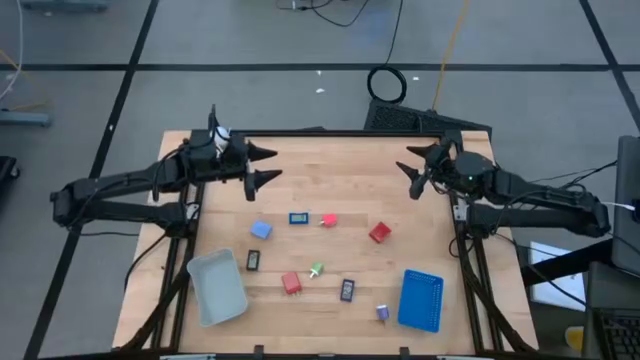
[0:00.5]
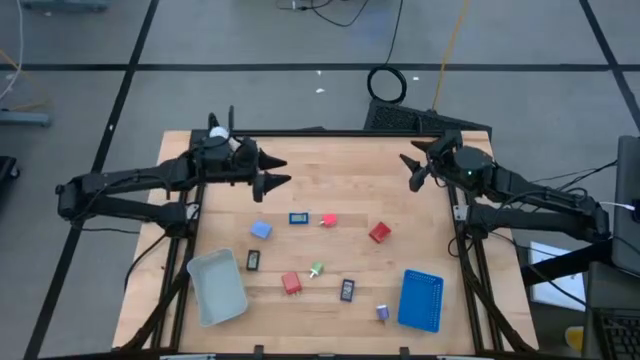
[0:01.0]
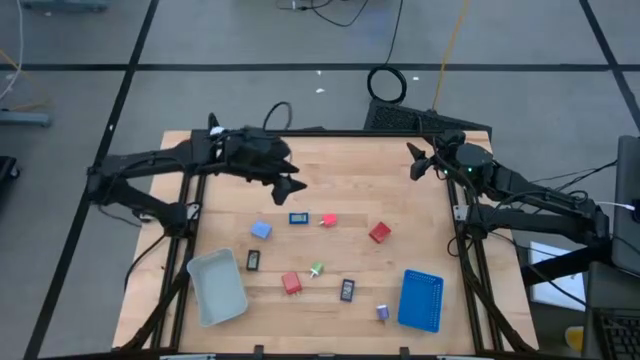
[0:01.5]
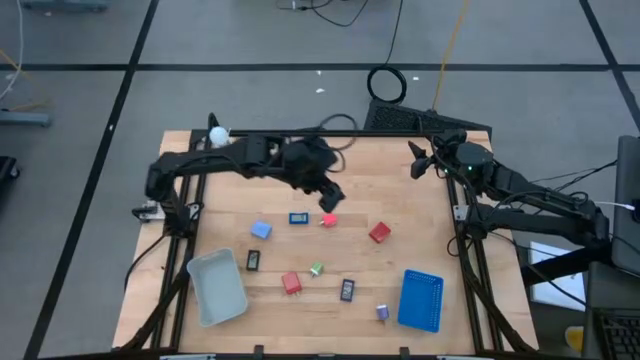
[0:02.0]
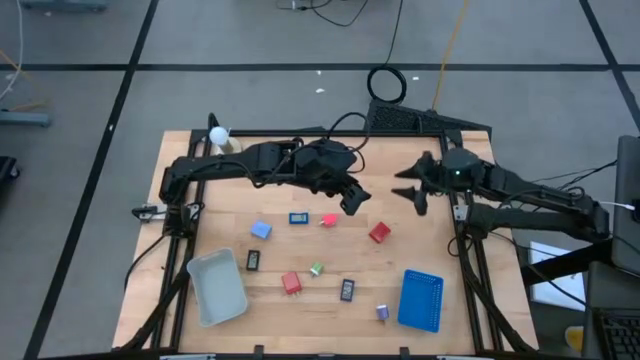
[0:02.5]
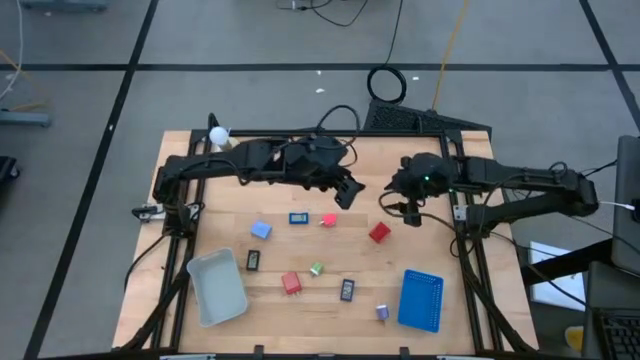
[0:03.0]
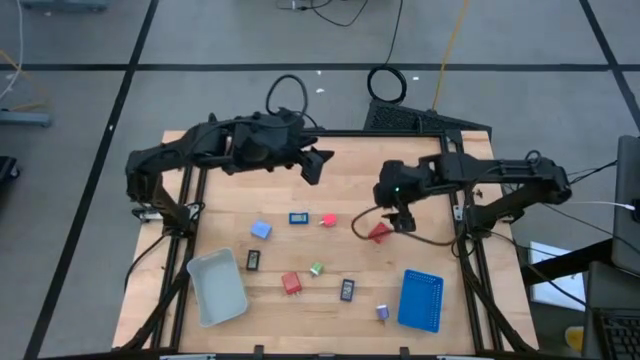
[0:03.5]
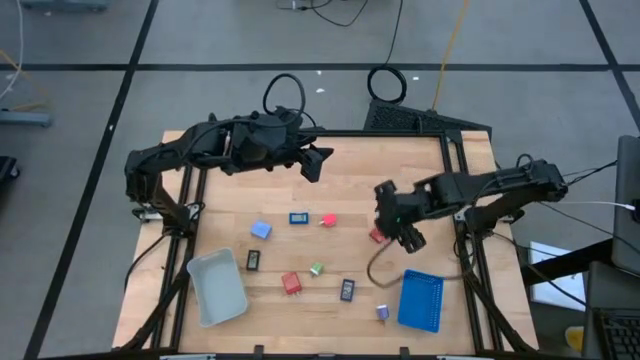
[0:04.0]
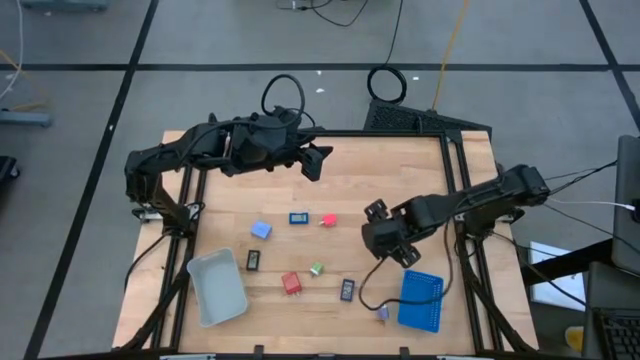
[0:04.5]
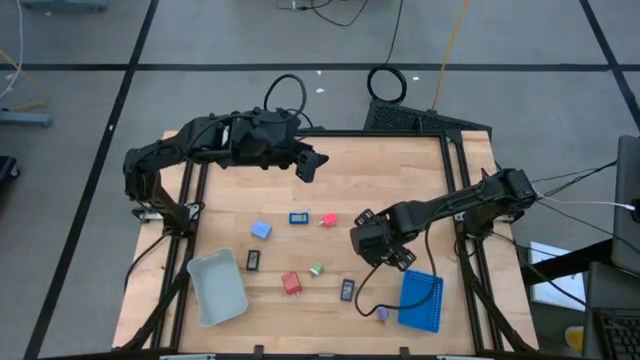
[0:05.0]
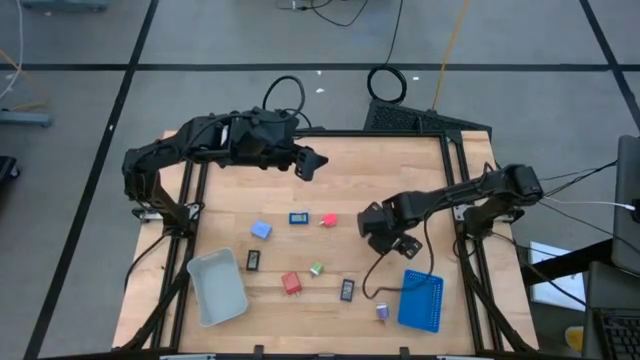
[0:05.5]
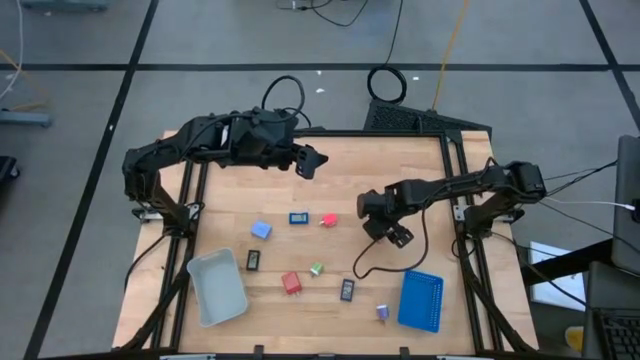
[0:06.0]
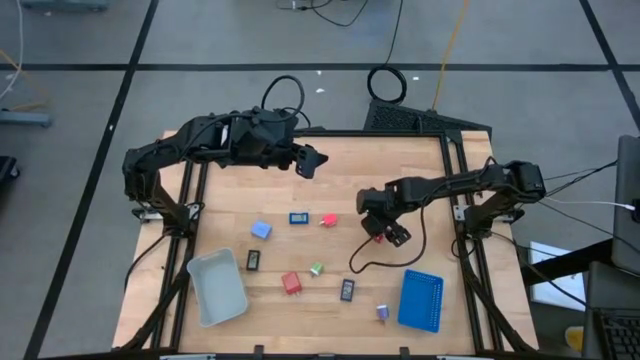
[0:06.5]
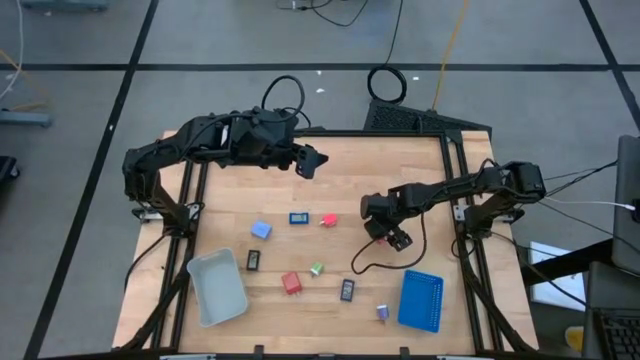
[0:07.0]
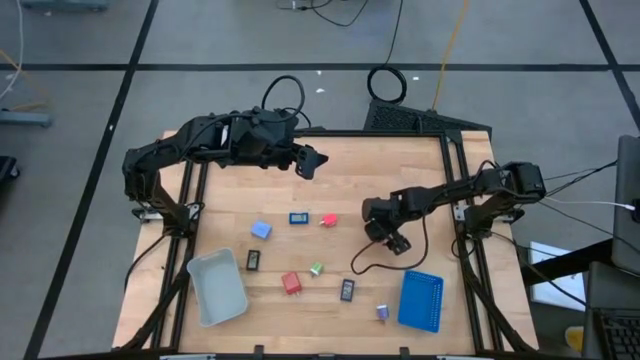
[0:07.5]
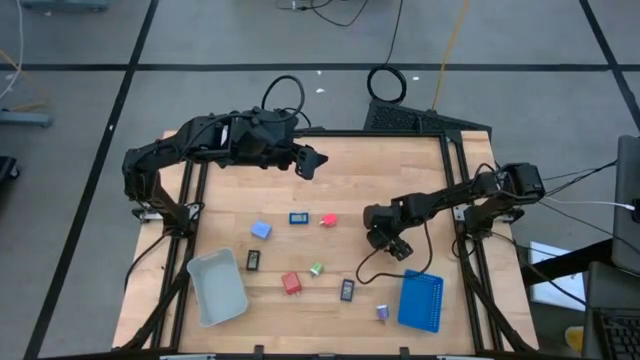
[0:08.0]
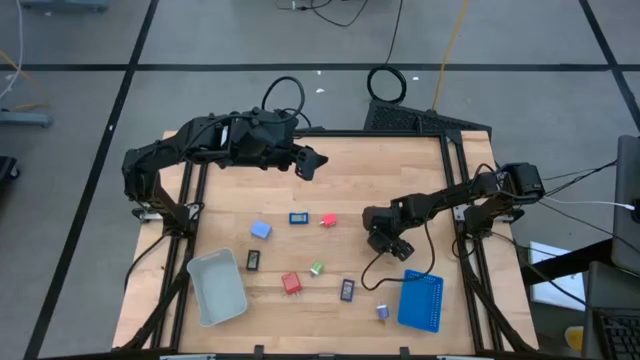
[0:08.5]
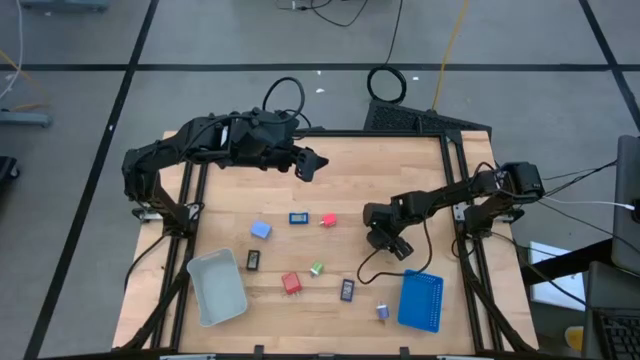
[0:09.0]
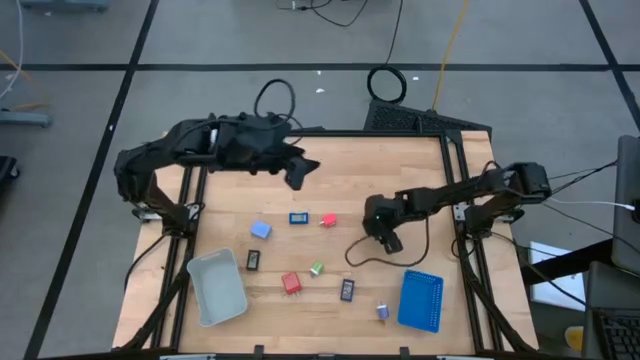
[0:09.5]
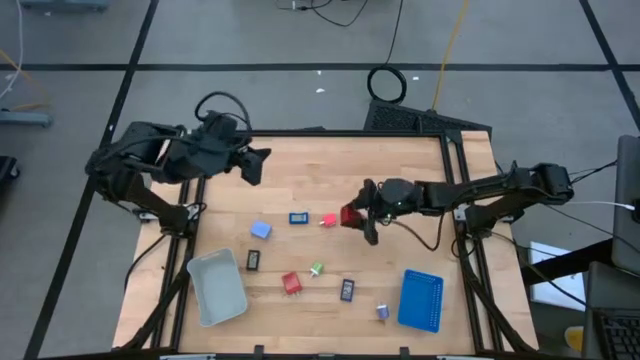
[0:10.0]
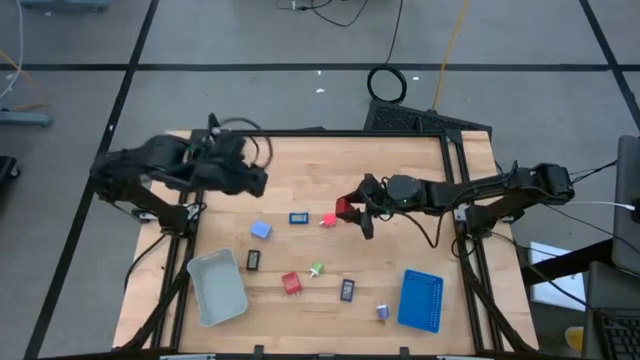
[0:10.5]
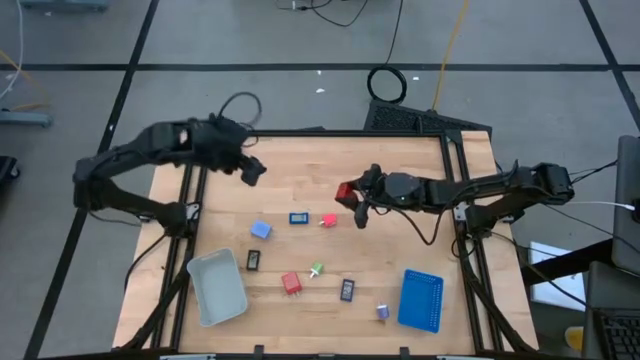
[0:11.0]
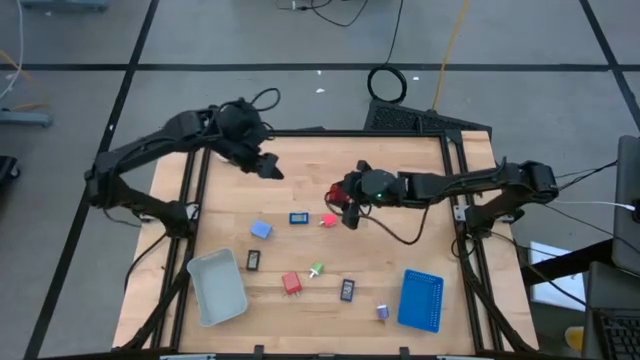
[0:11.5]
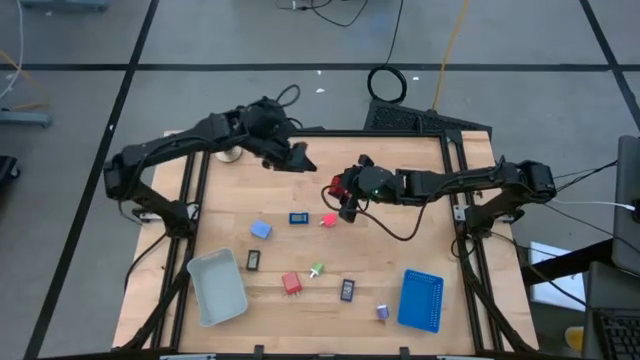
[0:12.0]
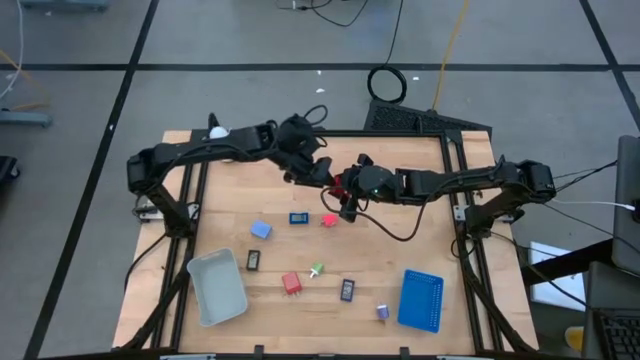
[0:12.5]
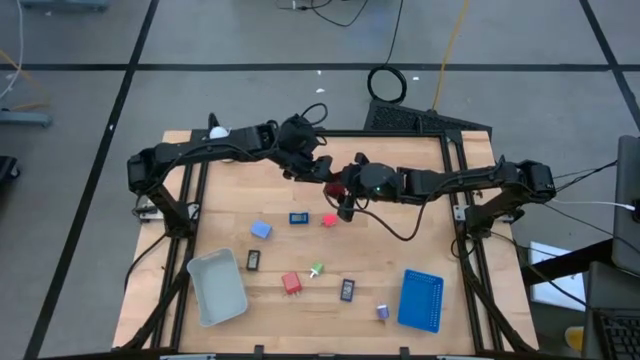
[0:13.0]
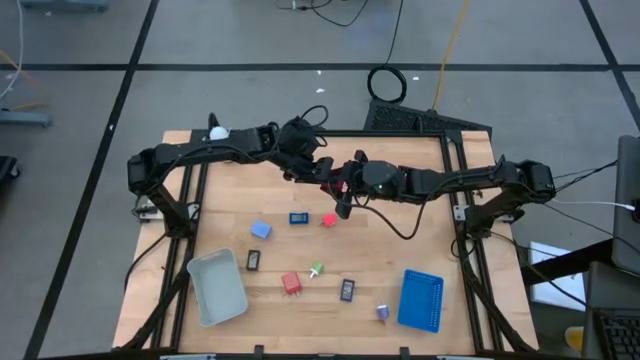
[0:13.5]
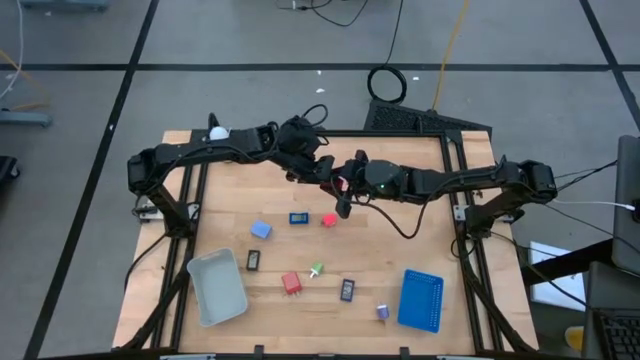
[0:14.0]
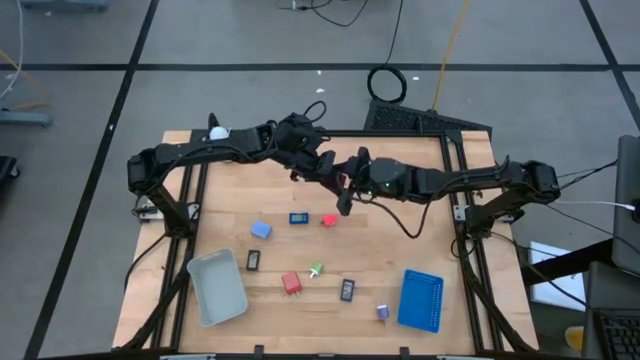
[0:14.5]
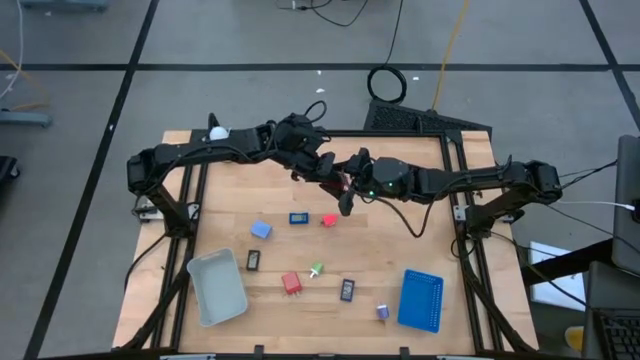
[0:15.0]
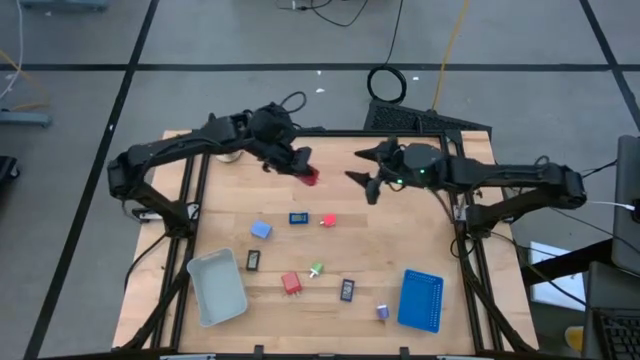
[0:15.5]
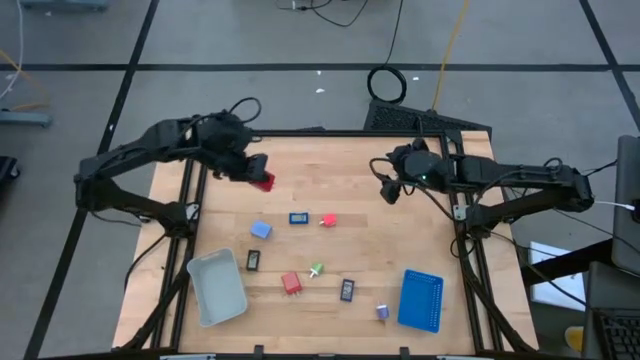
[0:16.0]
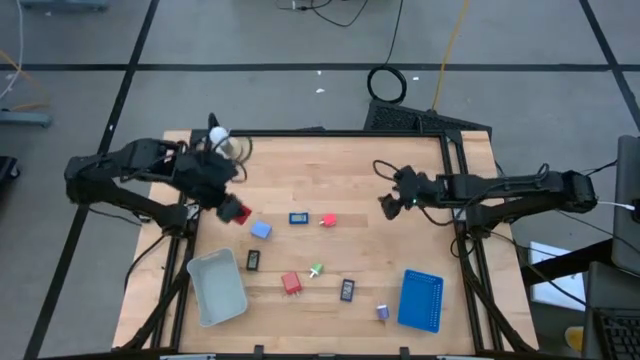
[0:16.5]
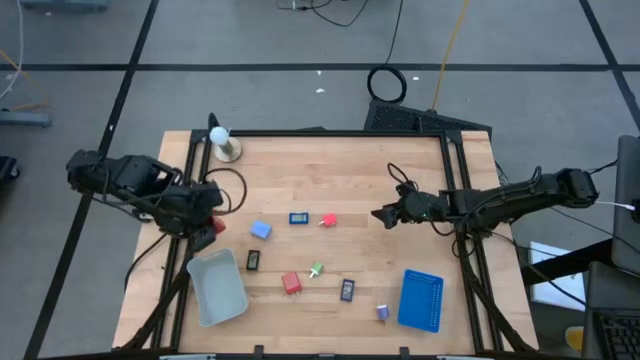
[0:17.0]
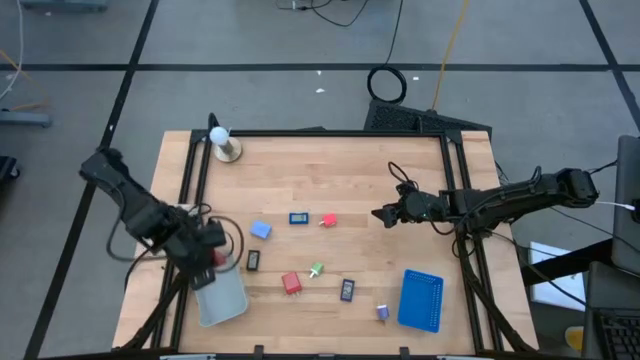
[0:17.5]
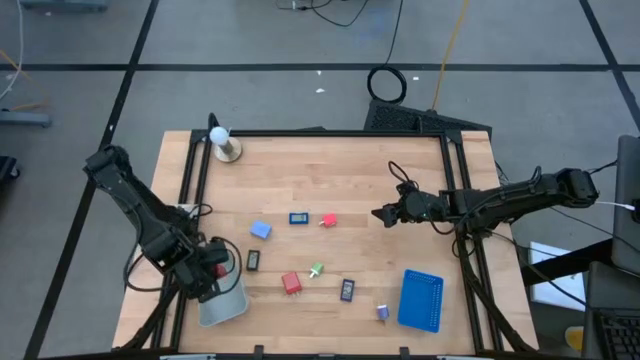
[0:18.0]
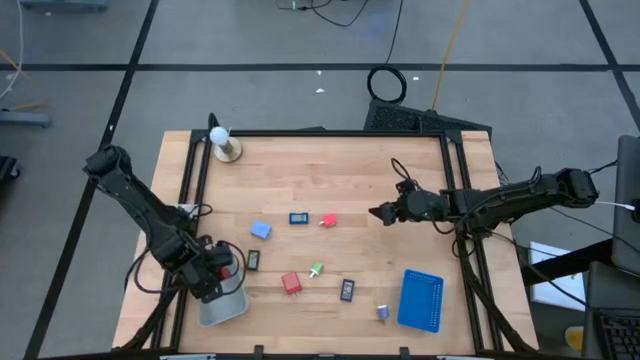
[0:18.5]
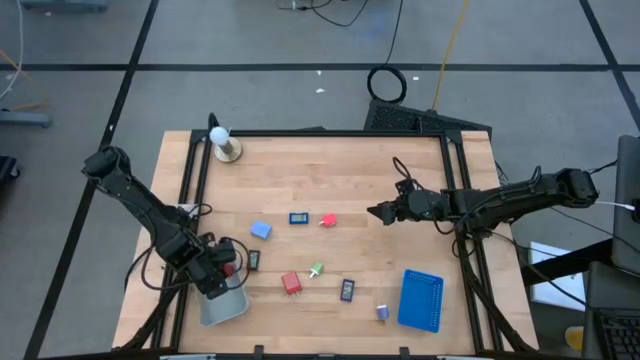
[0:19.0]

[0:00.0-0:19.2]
Task: Pick & Place Office items
Put the top red power adapter into the gray bin
